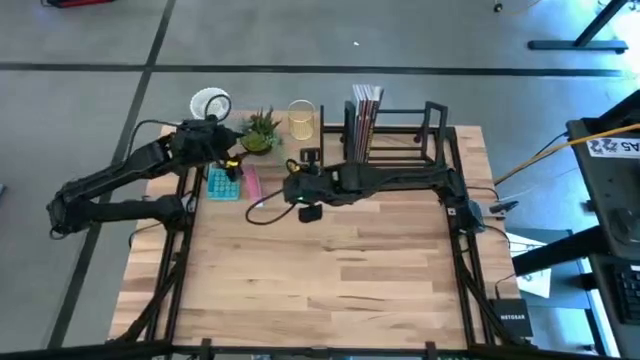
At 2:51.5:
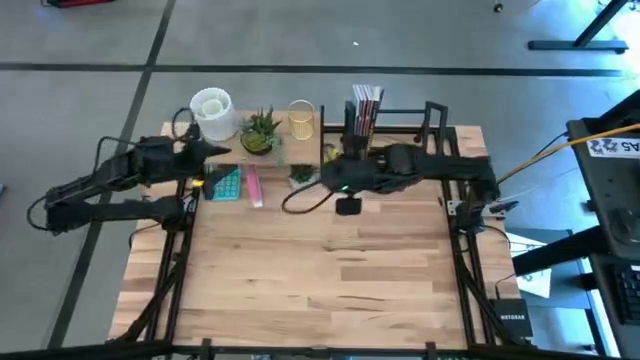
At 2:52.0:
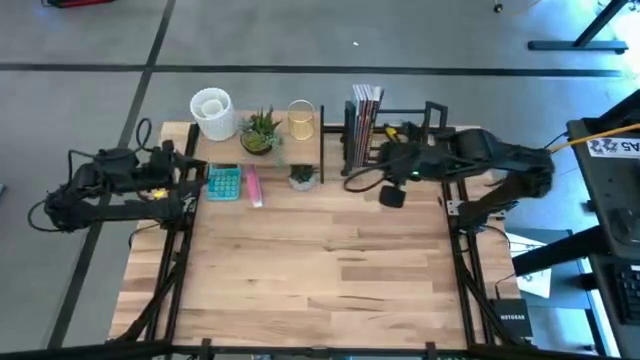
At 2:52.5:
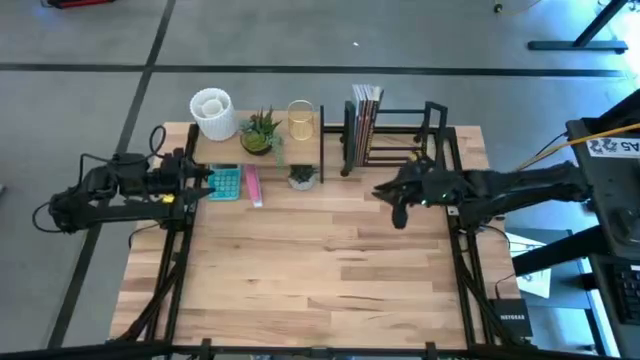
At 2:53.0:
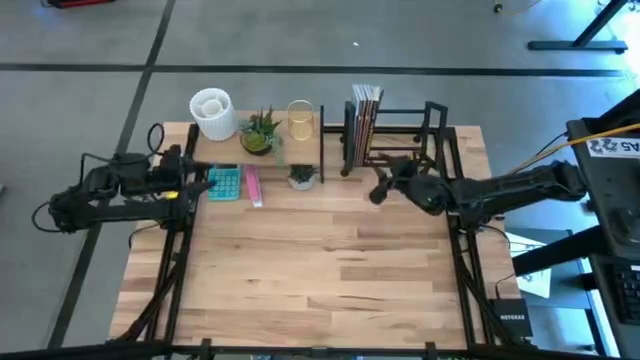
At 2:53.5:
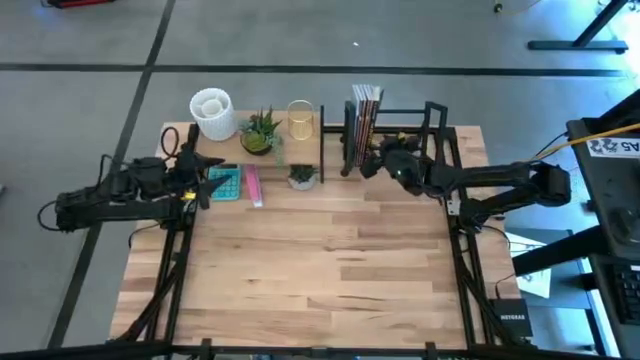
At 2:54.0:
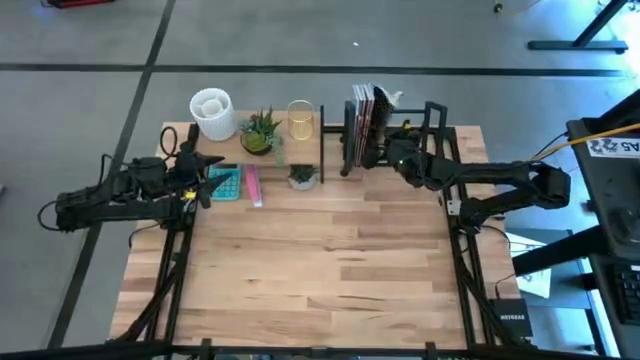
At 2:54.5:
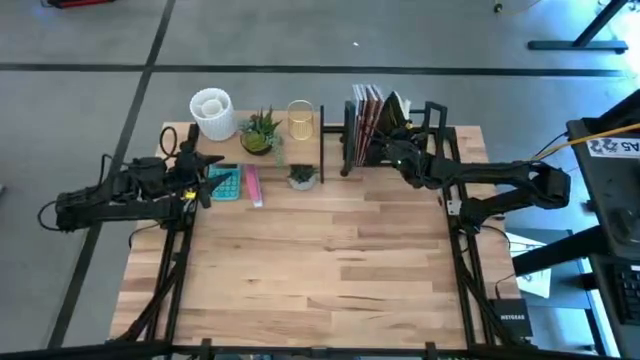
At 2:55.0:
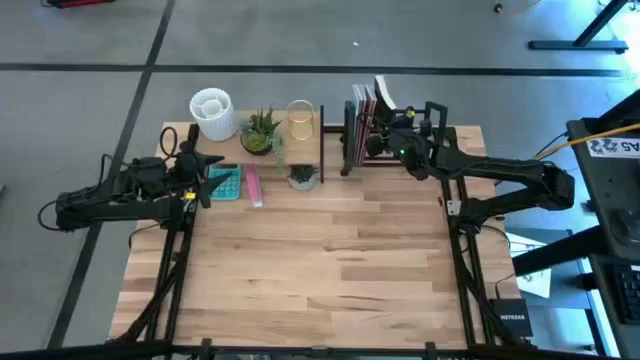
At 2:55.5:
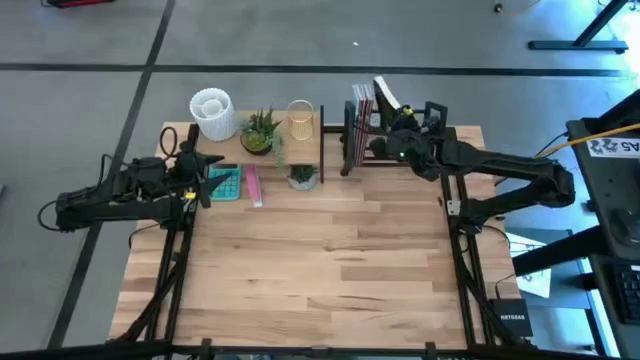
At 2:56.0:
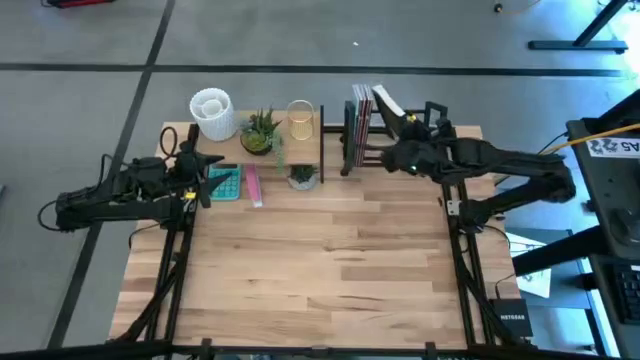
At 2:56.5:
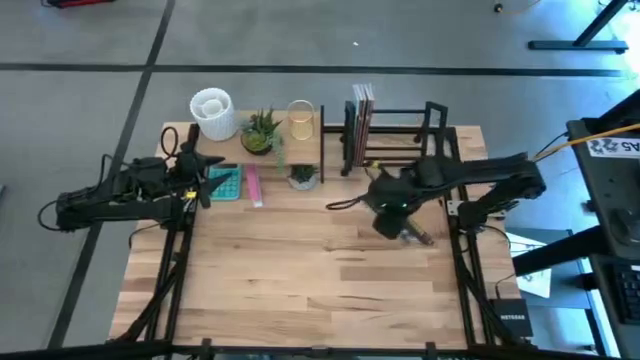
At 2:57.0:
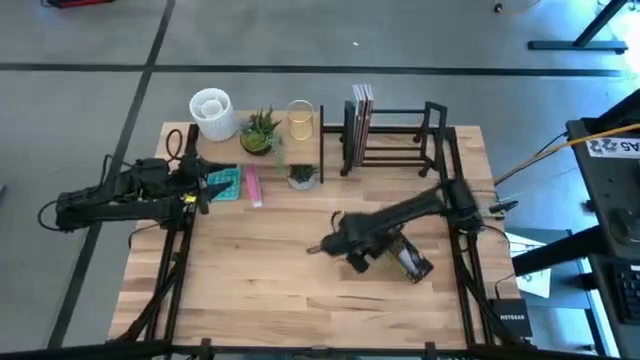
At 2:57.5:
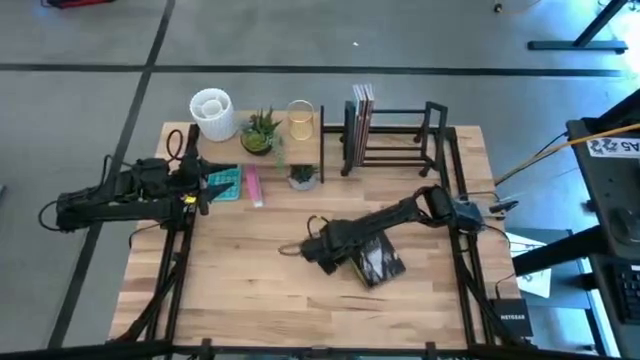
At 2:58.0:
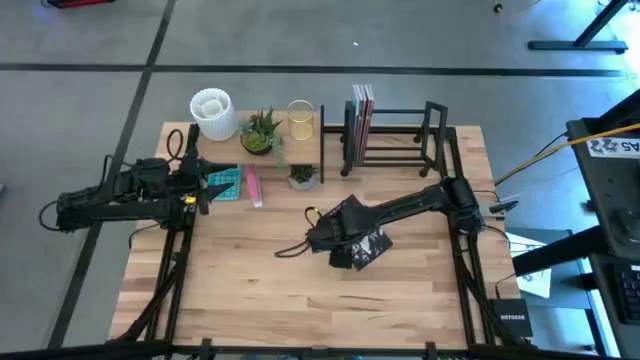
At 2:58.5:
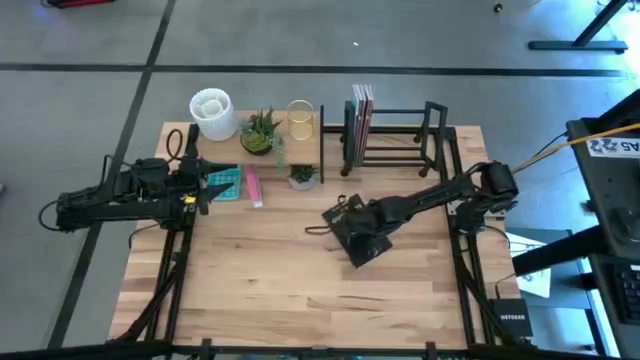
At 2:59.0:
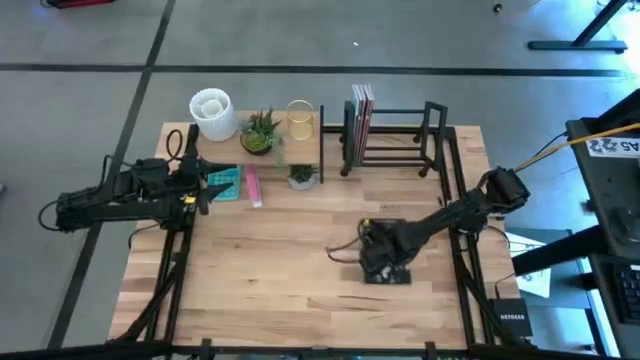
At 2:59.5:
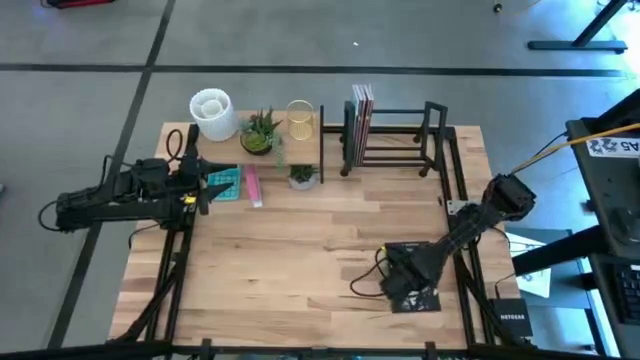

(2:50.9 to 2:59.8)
Task: Stock shelves
Remove the black book from the bookshelf

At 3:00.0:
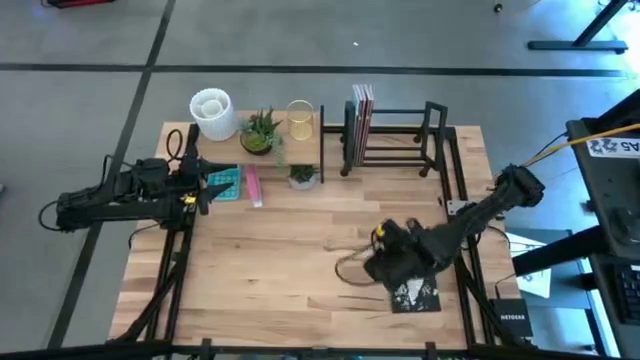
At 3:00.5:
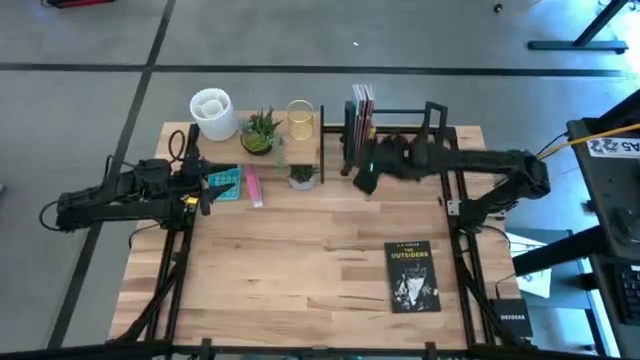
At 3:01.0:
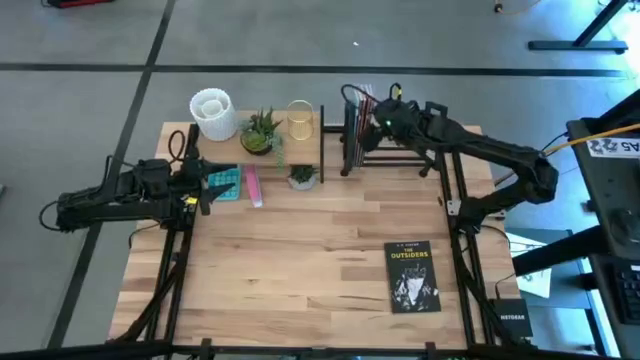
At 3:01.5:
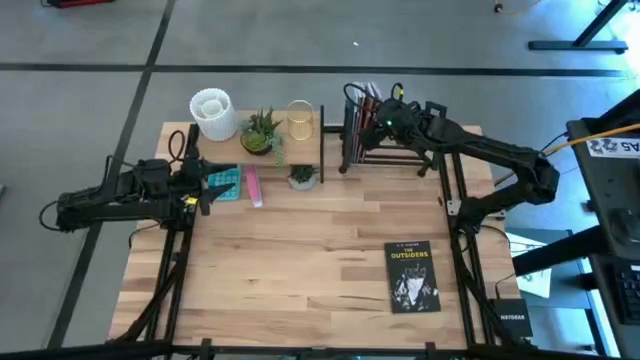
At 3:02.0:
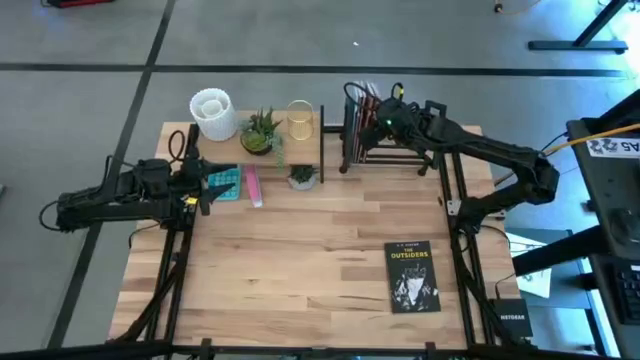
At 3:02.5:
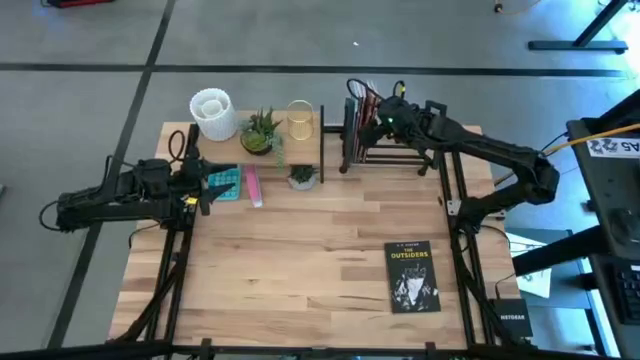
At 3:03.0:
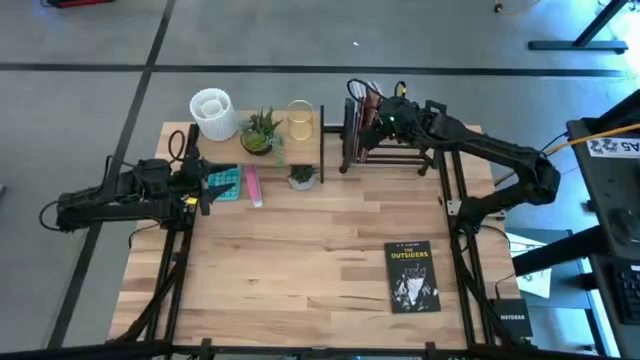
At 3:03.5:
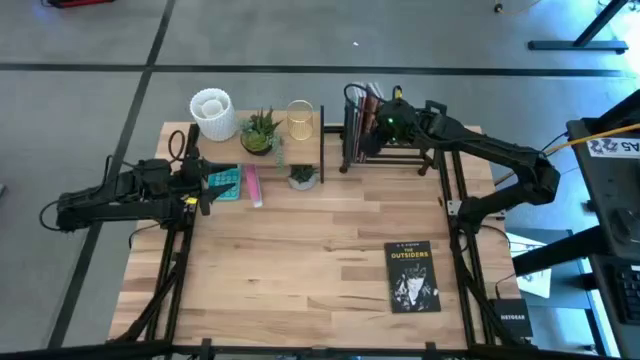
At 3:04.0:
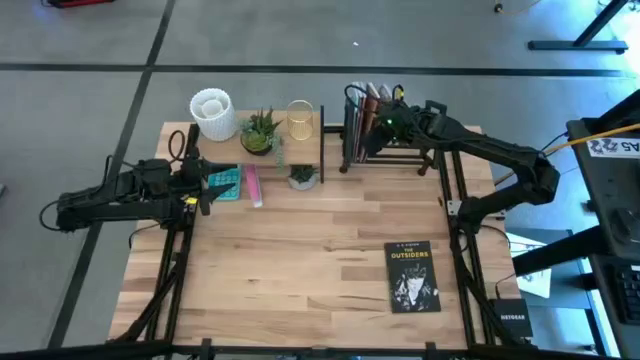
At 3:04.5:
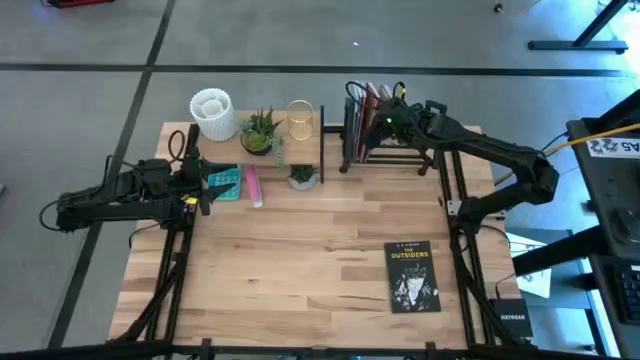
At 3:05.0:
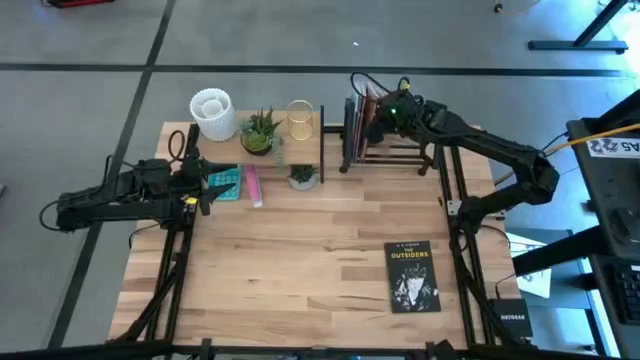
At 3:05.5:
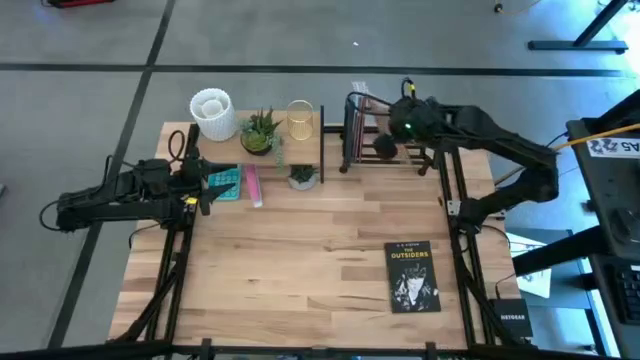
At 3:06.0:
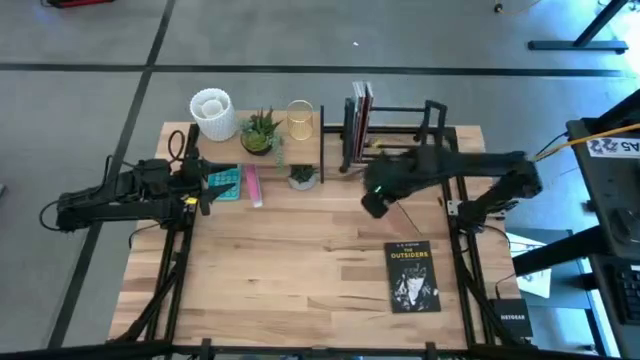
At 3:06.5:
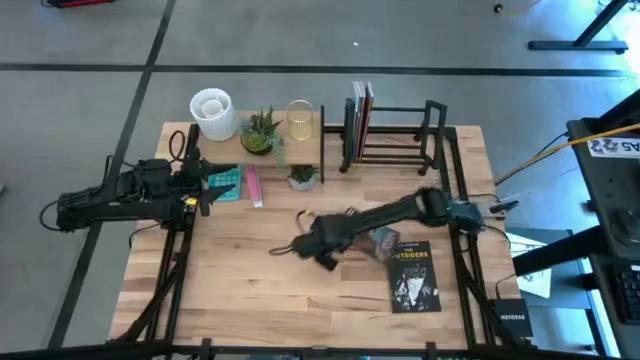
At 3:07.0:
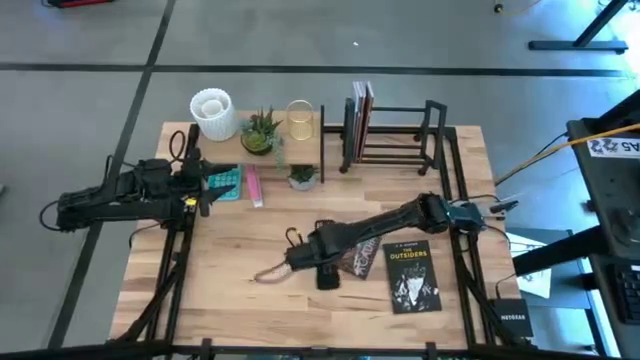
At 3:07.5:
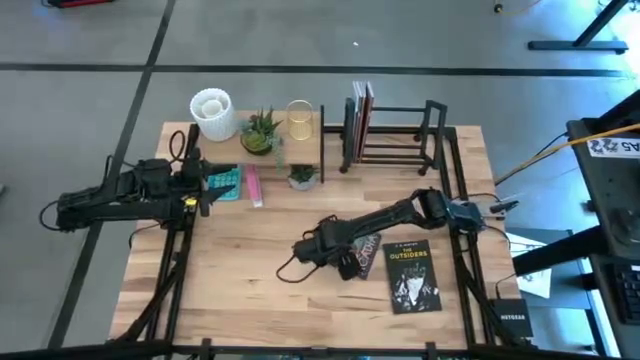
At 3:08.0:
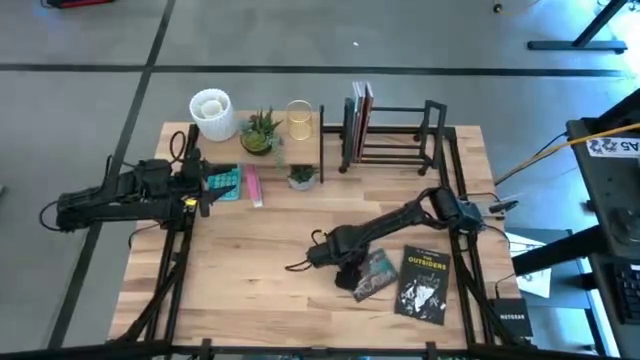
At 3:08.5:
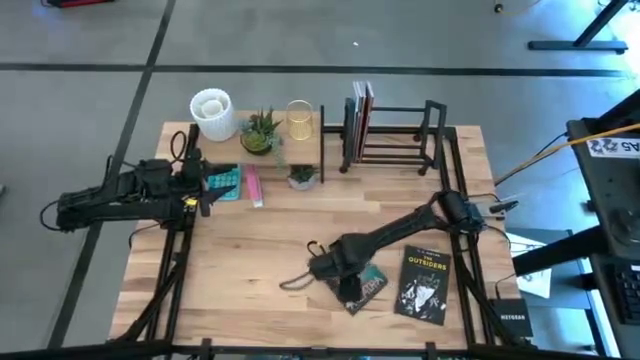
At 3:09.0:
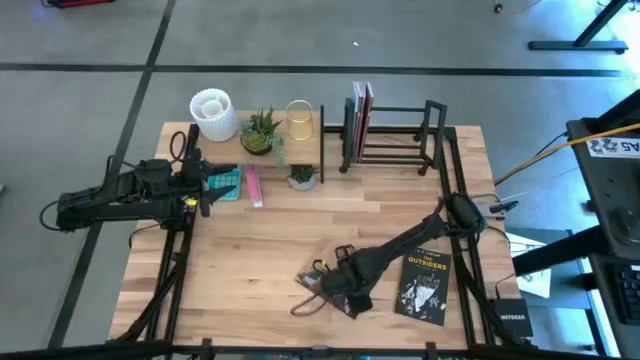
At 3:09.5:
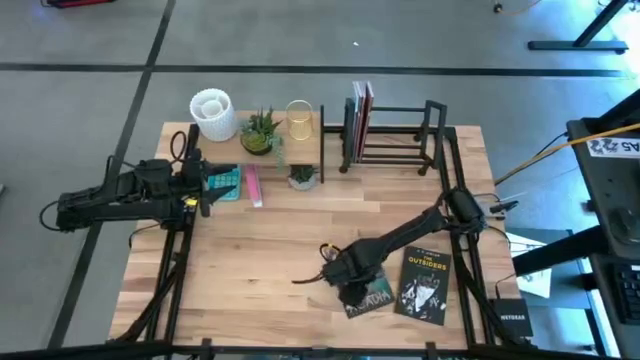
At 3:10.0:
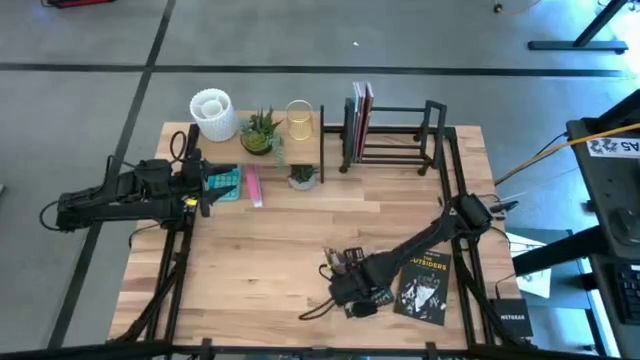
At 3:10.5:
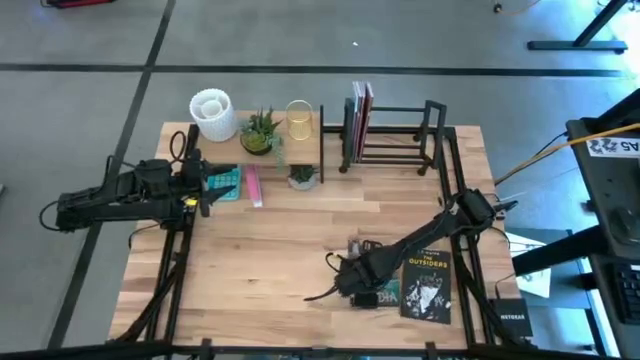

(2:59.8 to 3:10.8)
Remove the brown book from the bookshelf

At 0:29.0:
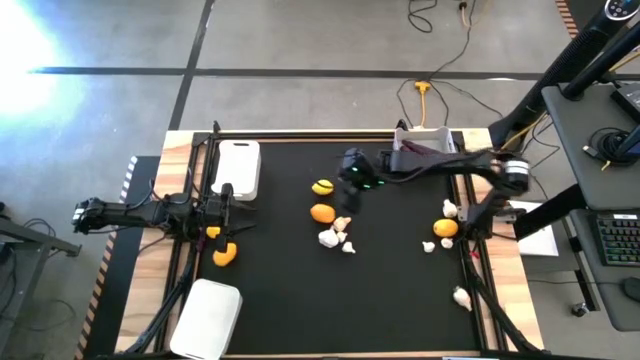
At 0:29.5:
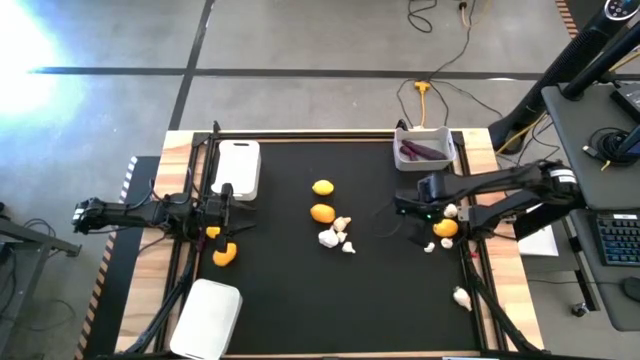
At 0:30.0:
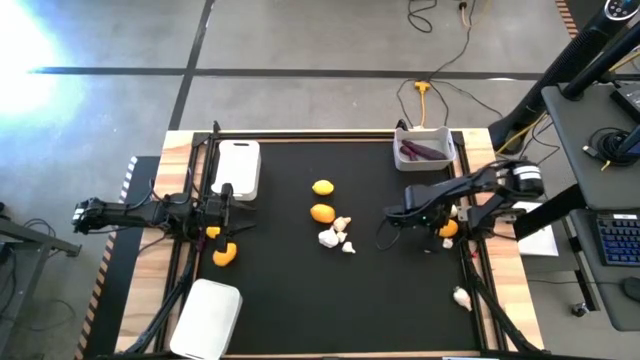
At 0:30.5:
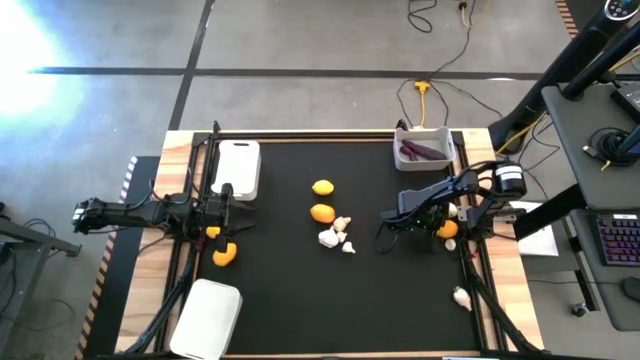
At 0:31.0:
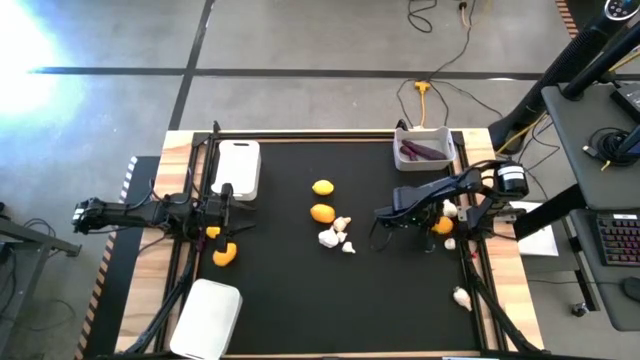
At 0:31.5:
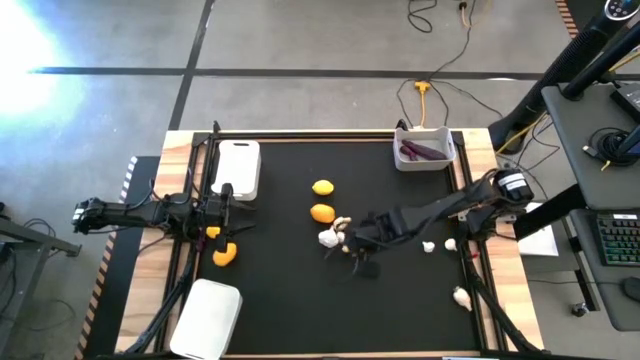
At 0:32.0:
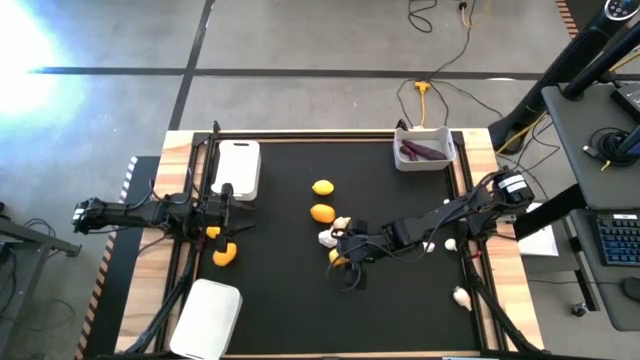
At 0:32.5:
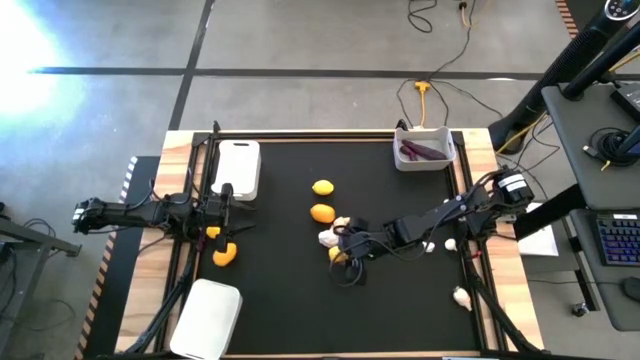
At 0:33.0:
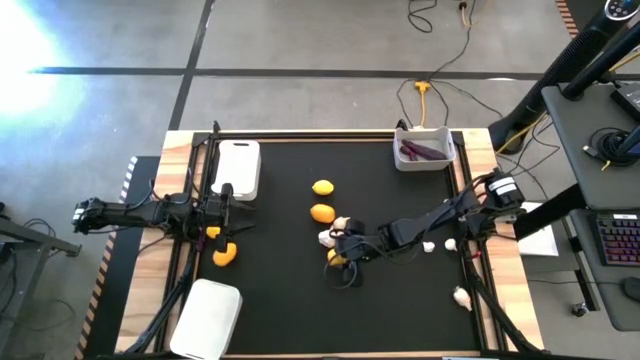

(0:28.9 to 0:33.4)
Task: Sort produce into baskets
Move the lemon to the center of the table
